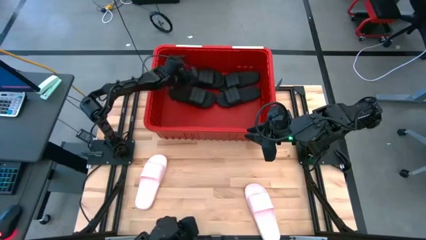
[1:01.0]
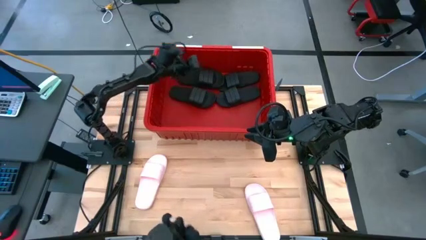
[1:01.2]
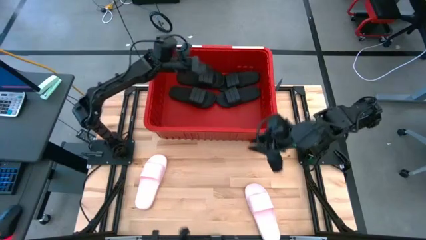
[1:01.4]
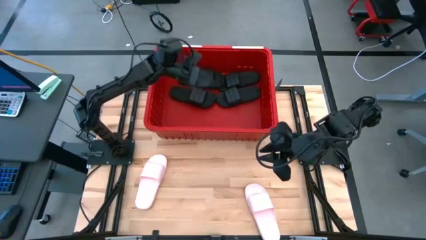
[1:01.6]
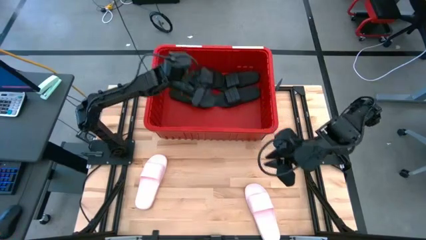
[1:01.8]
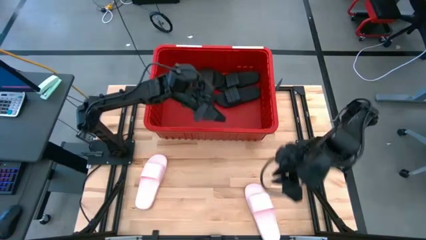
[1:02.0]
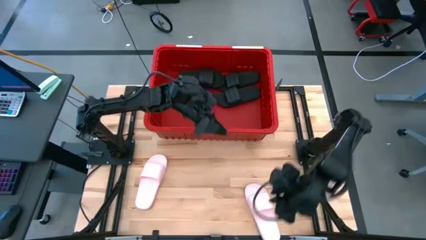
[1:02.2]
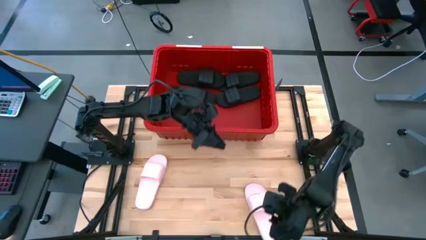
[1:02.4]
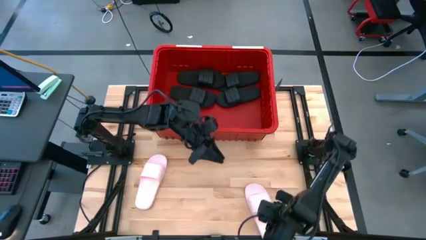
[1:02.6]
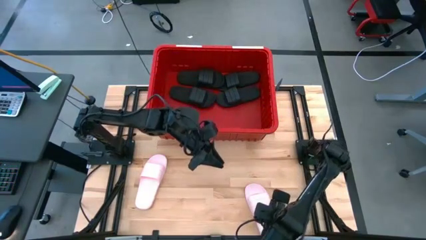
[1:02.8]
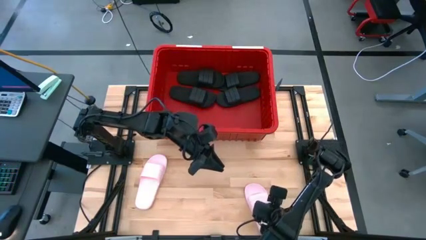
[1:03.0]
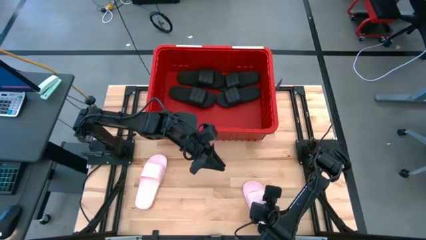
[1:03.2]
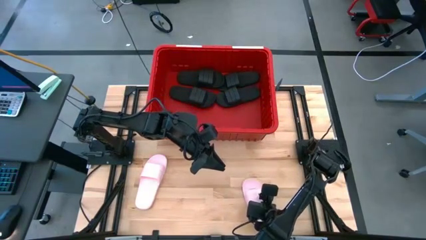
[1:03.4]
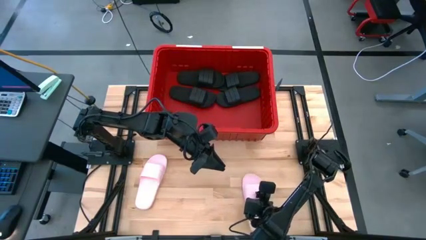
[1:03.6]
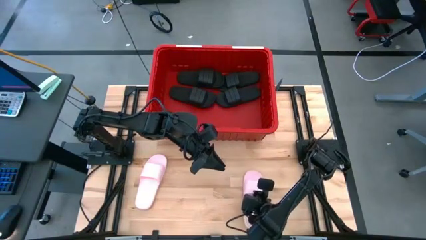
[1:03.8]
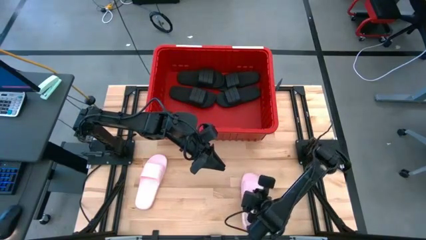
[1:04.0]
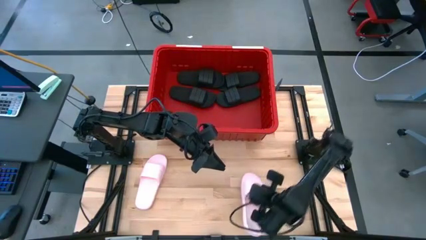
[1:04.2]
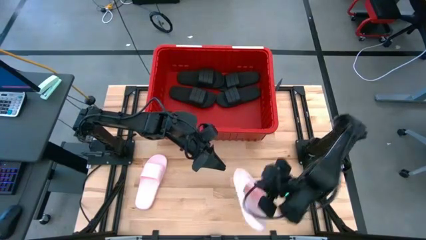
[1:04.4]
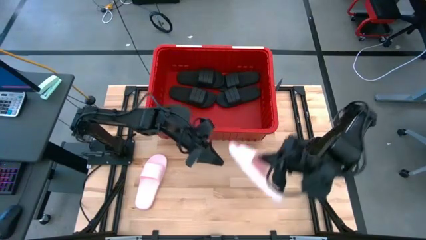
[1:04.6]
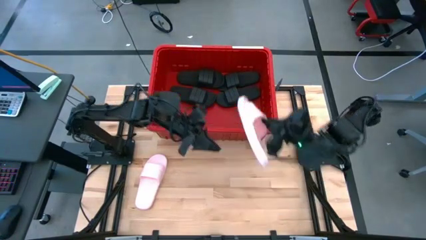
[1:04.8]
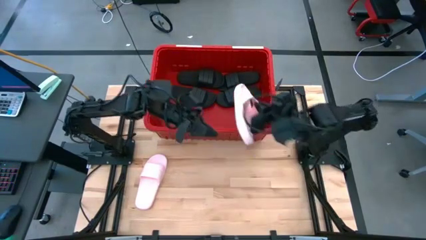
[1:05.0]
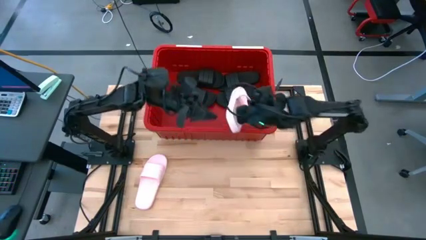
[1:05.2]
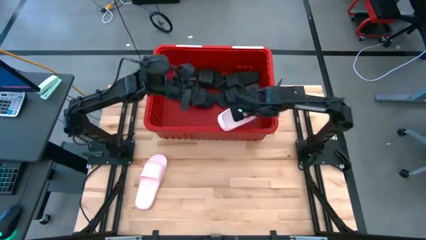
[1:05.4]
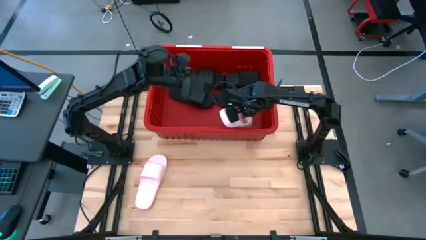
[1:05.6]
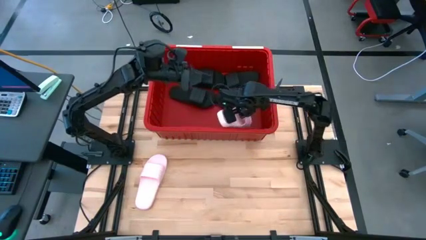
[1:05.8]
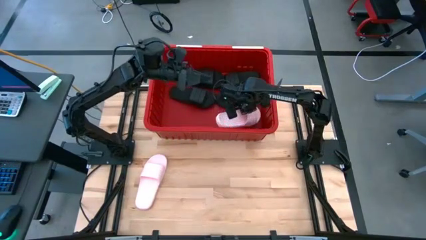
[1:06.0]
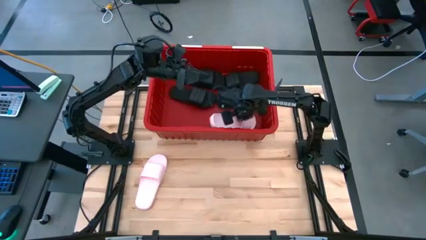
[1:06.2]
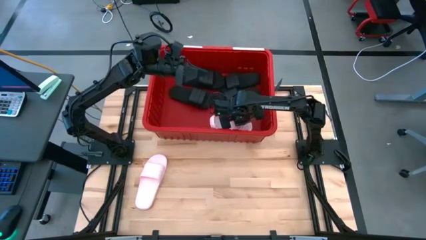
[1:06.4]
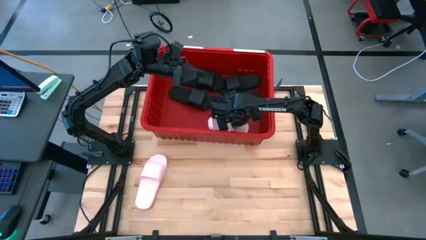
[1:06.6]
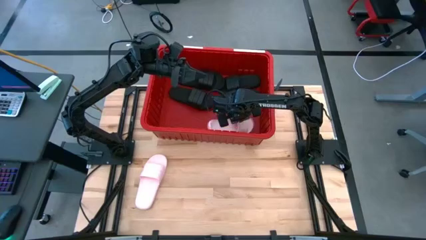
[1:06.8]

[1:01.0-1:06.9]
Task: Pick and place slides into bin
Put the pink slide into the red bin

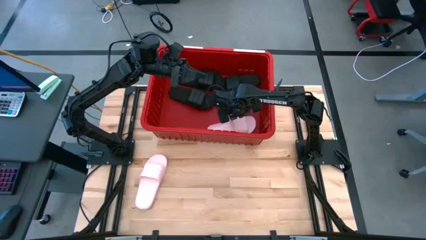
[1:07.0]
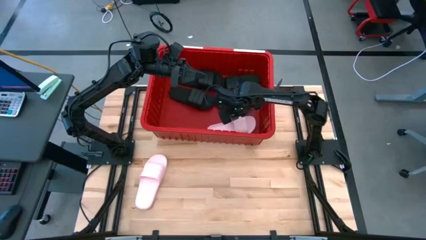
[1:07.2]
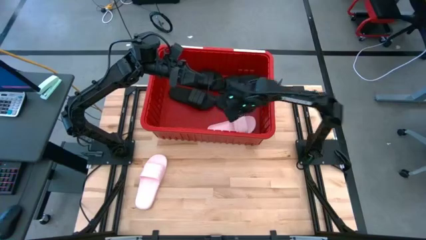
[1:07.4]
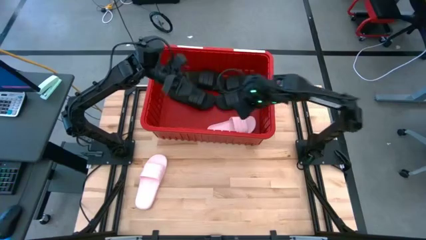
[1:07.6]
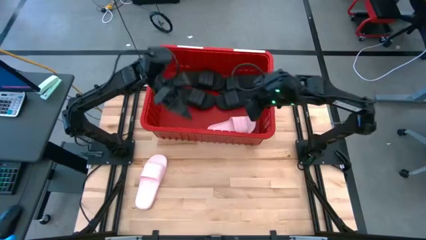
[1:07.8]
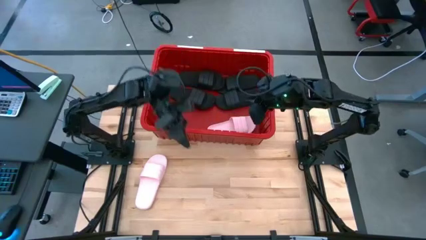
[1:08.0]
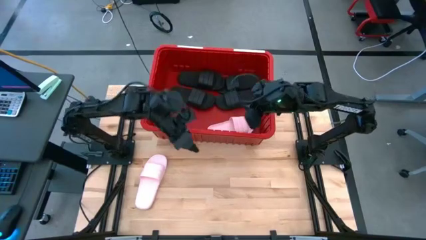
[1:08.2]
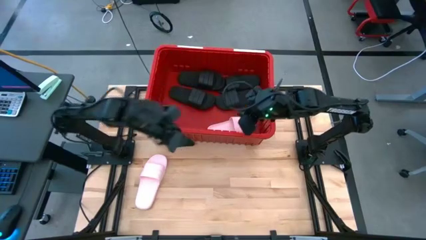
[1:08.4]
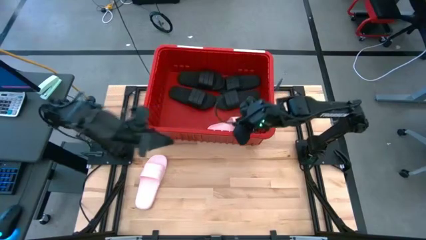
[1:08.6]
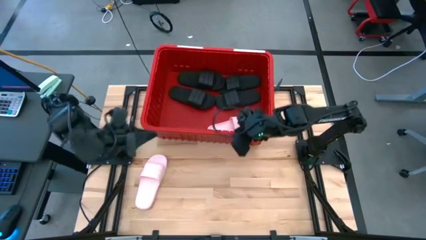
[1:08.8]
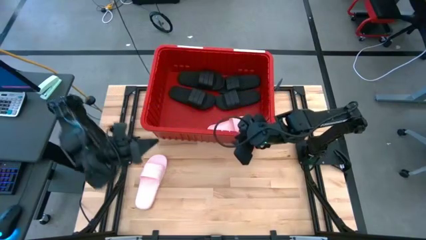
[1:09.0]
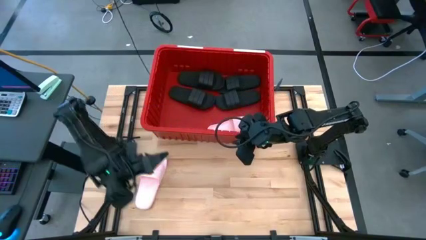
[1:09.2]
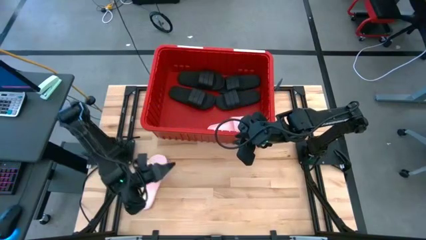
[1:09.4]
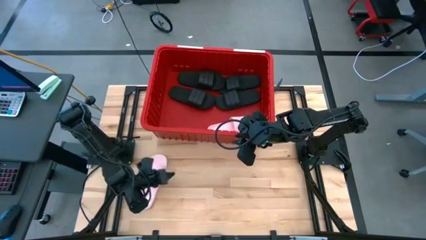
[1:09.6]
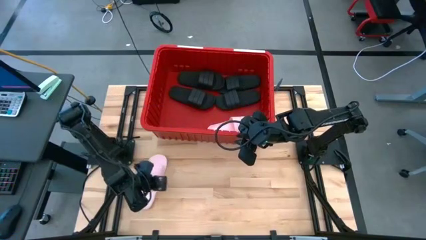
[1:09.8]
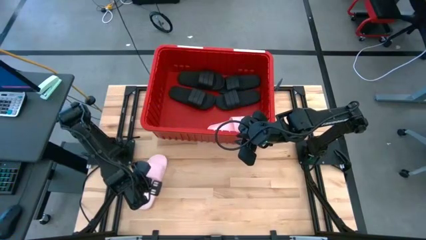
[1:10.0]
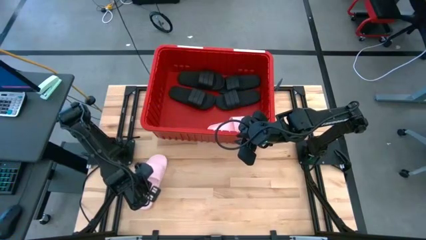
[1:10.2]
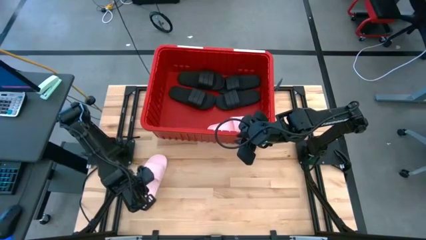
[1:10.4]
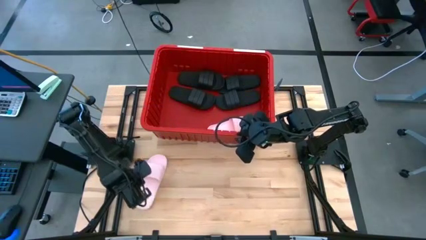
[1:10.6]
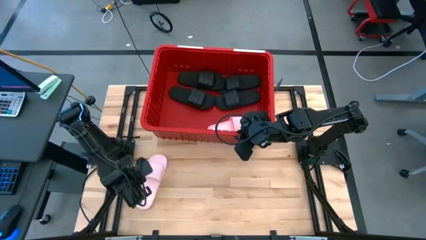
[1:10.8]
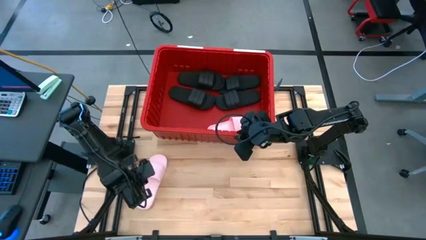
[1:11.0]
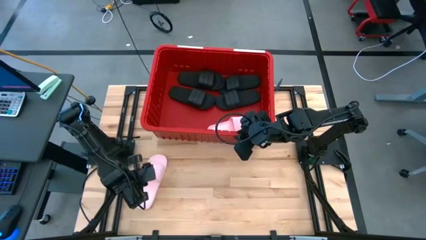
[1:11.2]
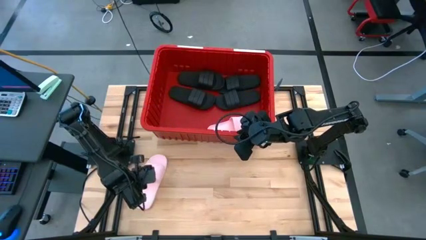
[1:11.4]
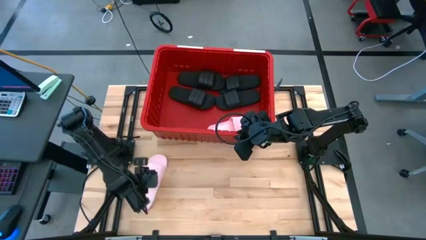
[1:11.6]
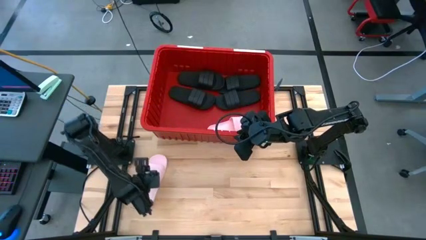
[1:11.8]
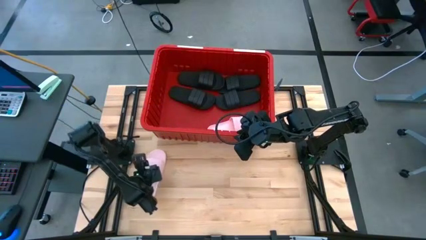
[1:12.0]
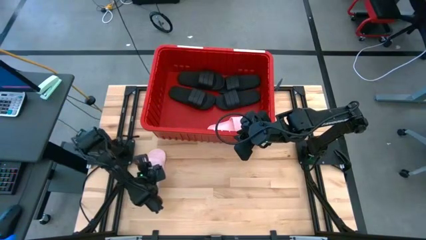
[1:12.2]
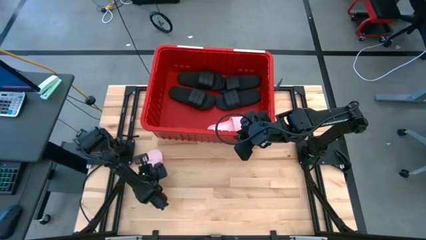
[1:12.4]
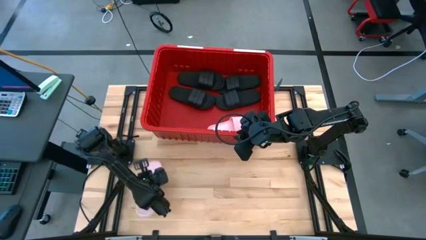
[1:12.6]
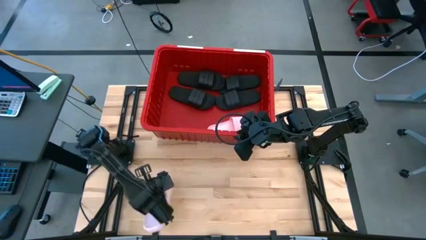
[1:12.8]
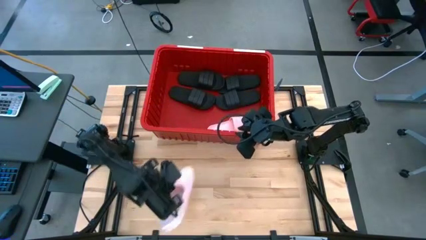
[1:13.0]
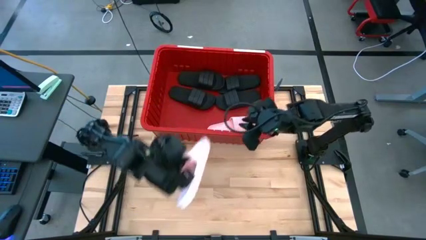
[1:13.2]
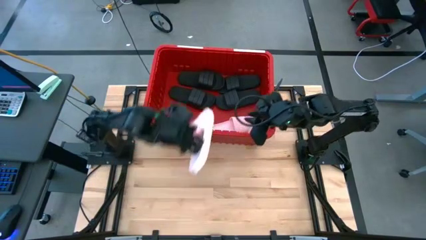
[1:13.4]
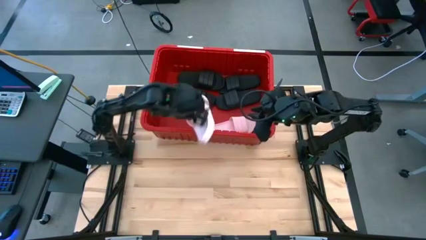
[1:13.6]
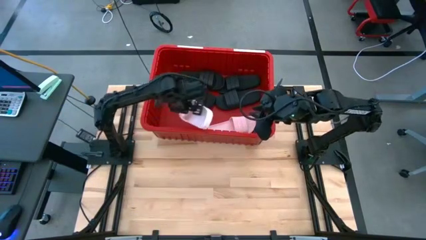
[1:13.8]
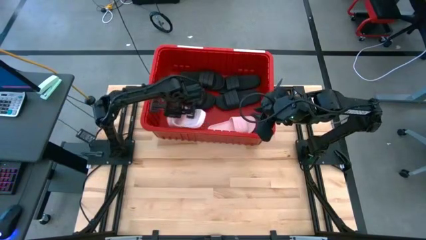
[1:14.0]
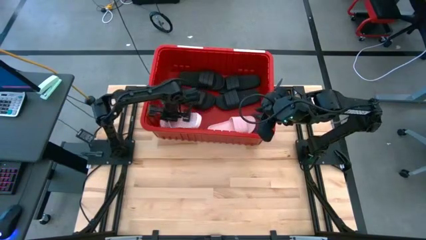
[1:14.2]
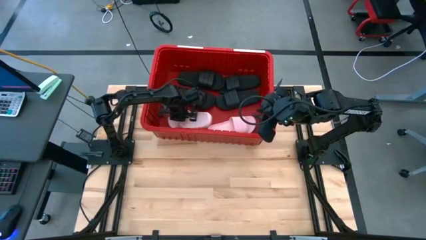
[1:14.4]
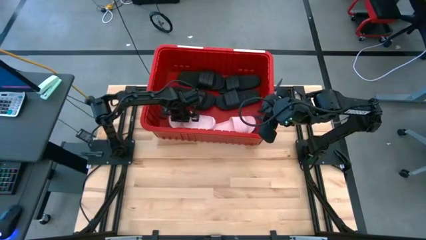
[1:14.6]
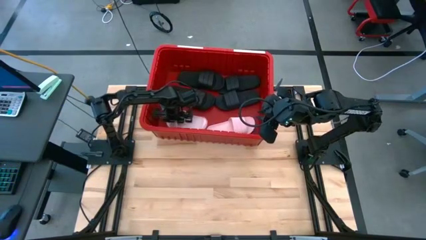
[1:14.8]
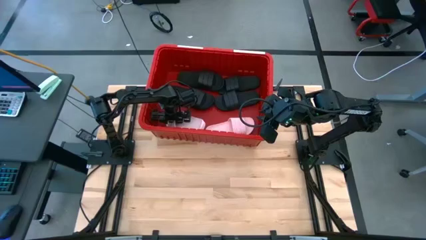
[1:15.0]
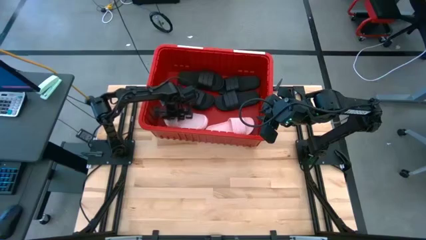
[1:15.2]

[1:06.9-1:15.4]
Put the pink slide into the red bin

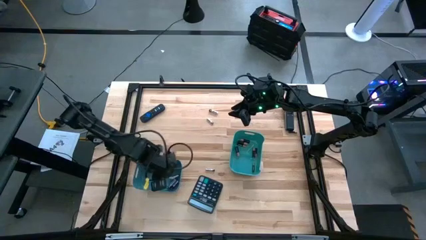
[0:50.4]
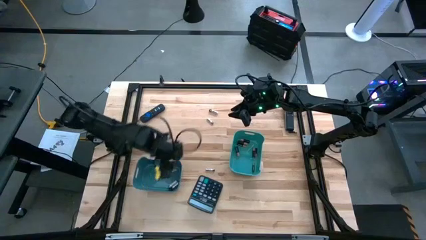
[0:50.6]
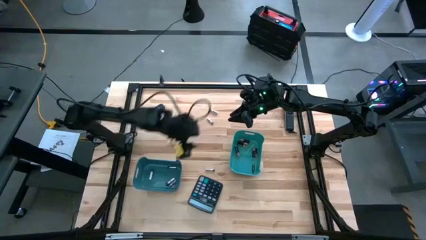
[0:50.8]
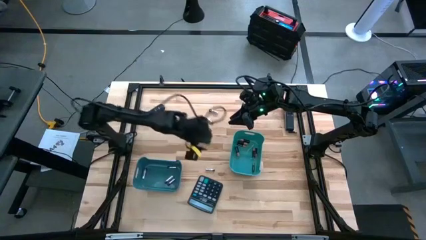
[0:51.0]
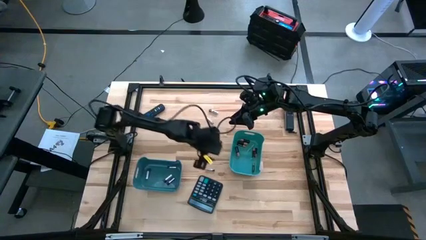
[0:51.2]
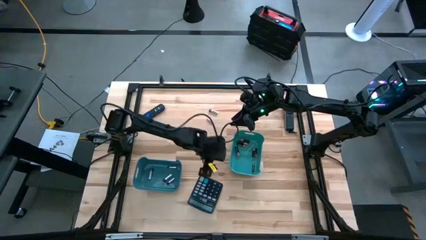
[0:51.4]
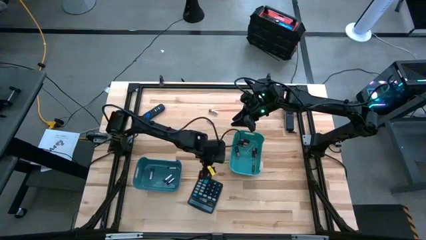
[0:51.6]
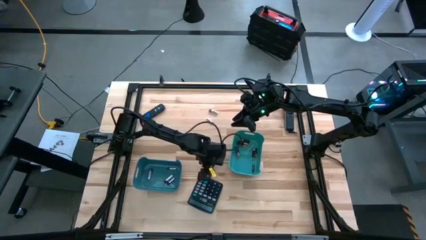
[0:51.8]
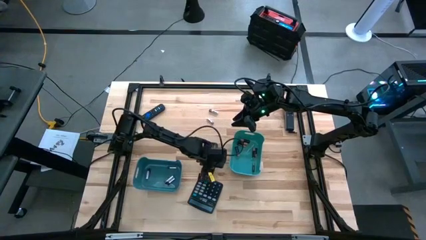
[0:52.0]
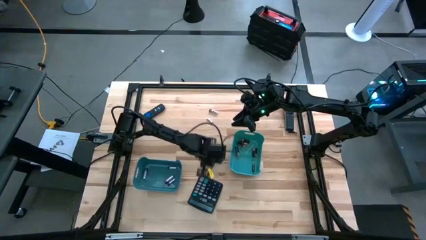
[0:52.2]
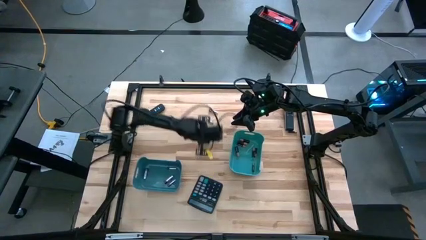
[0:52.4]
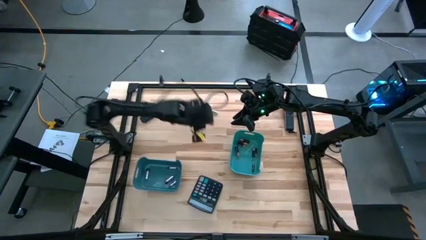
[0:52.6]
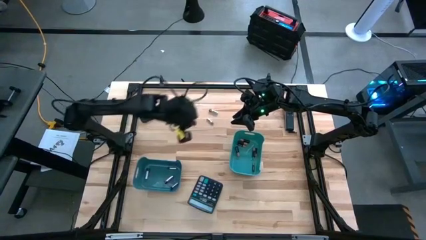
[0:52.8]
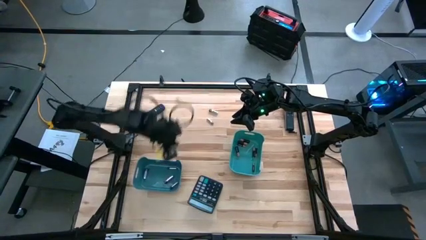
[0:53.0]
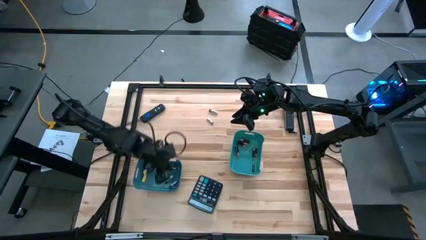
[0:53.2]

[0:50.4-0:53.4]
Task: Sort batteries
Put the silver battery into the dark blue bin
